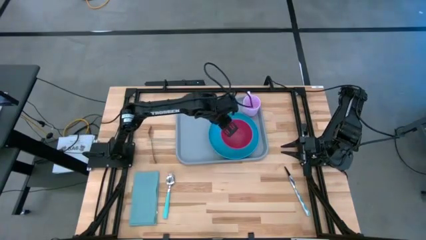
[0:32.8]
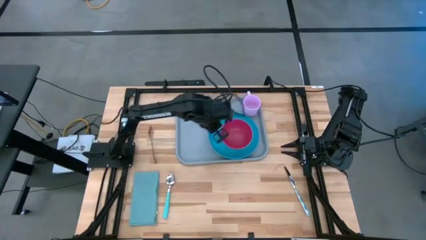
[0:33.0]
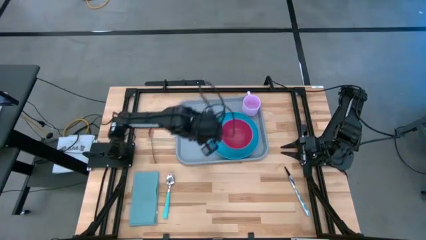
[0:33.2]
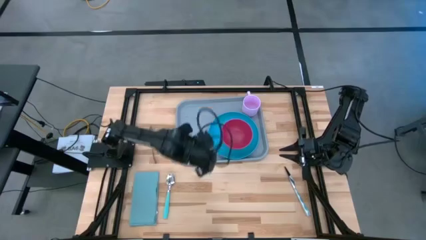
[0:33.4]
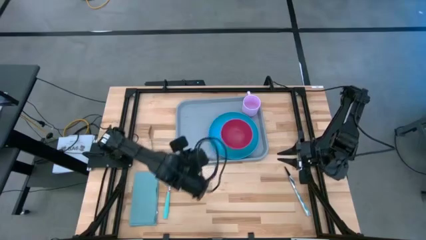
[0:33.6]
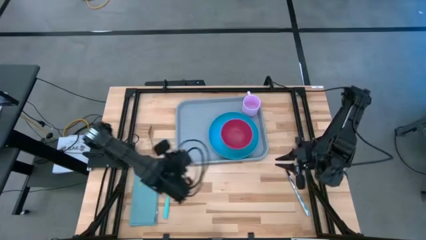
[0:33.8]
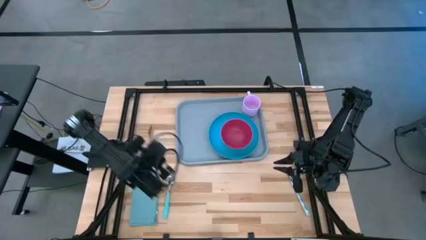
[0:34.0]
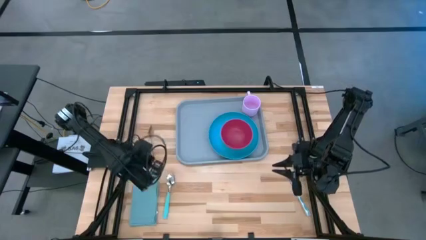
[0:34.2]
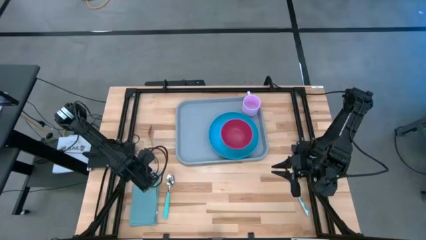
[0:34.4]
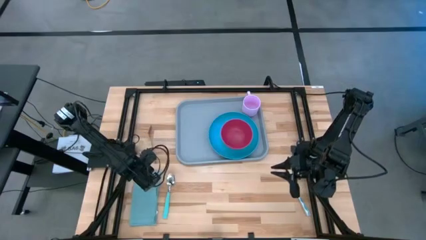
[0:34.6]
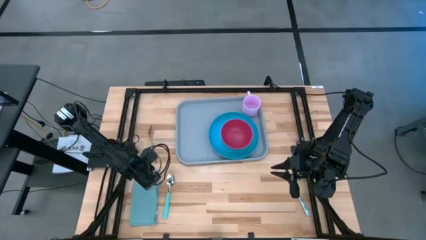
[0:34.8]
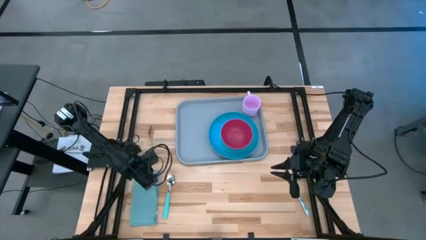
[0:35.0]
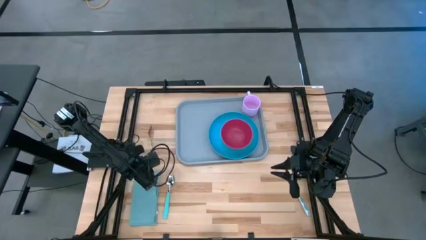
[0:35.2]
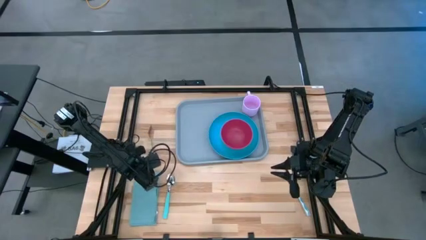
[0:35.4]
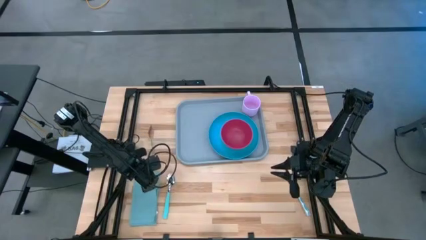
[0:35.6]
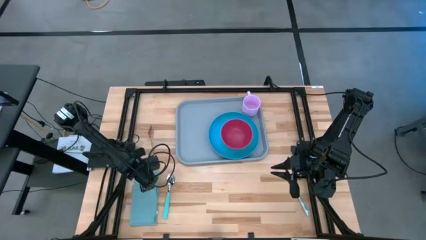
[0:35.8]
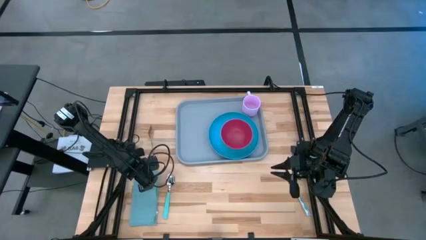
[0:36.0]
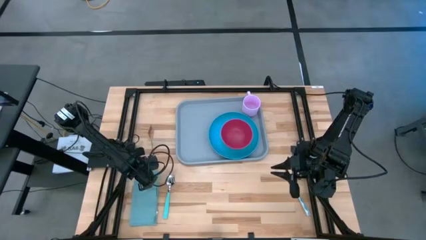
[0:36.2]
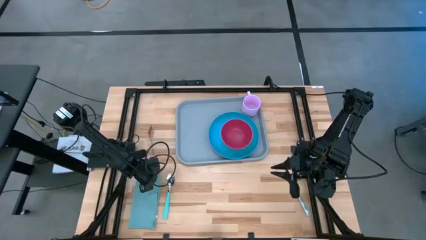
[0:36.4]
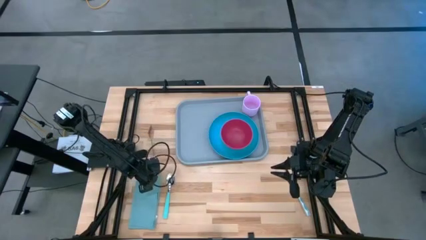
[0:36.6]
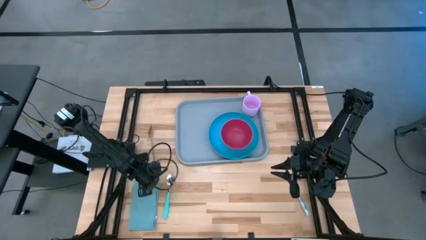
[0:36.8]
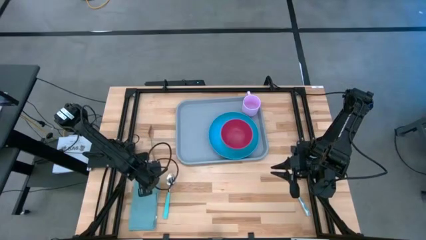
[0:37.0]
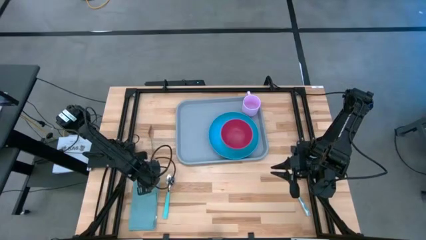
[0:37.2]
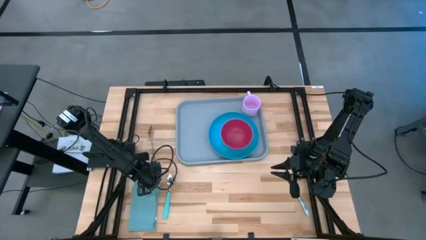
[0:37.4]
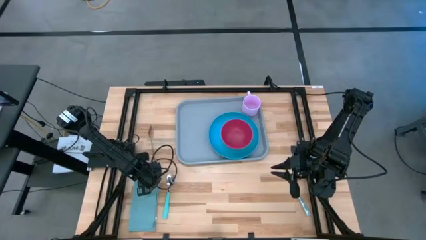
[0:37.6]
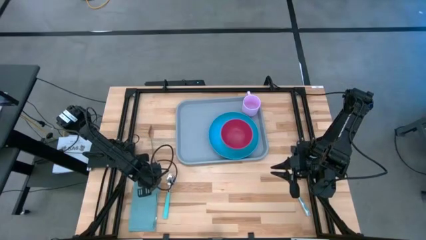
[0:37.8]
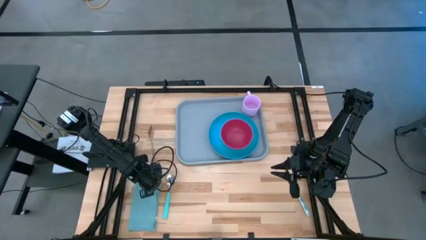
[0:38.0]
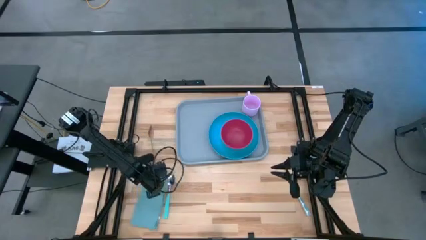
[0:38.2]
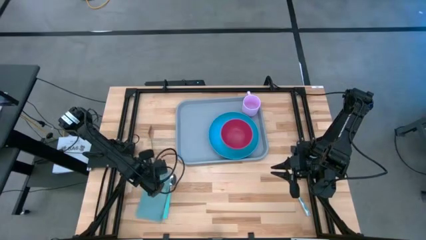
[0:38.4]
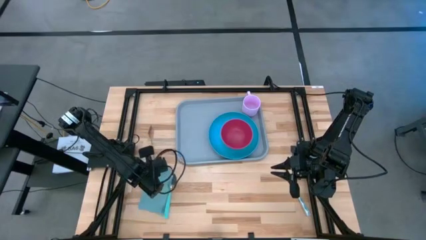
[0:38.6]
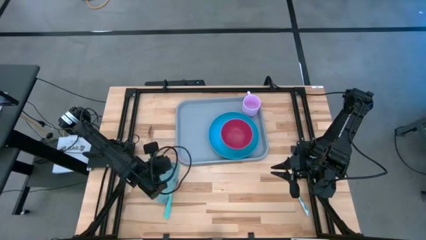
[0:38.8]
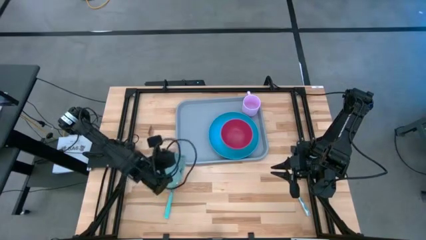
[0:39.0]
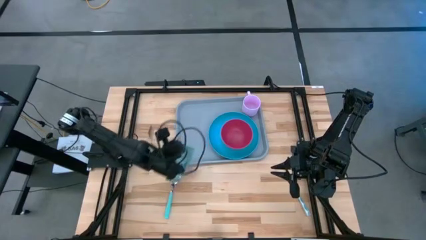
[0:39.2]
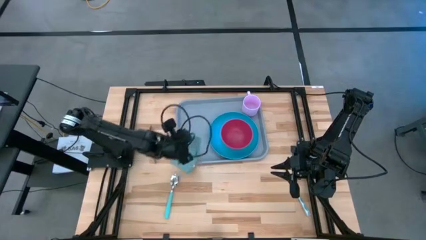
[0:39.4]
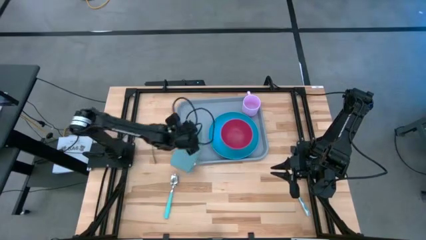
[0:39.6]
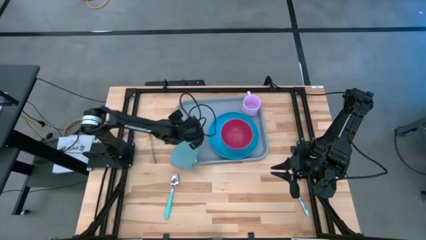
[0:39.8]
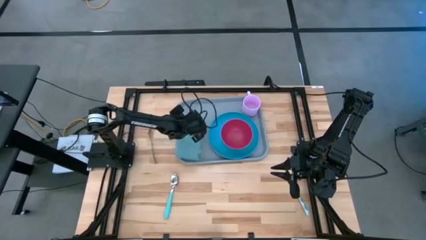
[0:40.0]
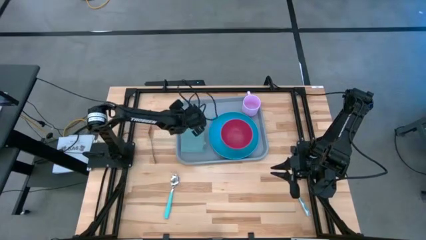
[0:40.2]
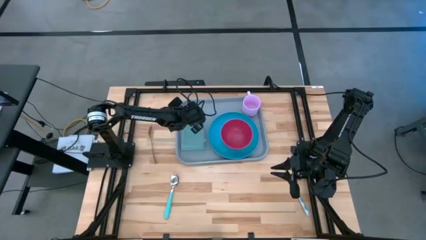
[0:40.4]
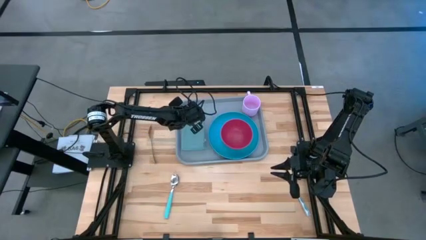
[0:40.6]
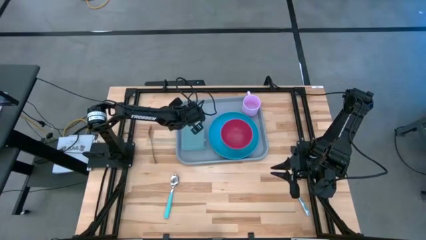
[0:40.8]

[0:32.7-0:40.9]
Task: Set up tray
Put the blue napkin on the gray tray

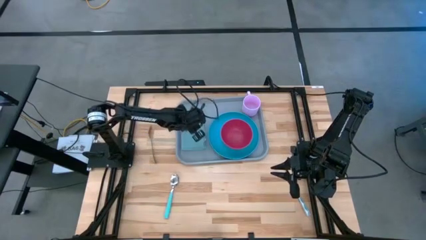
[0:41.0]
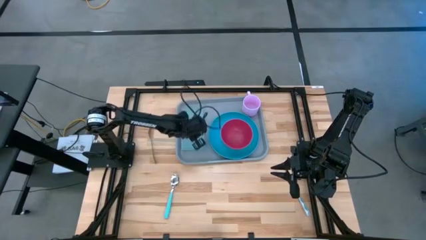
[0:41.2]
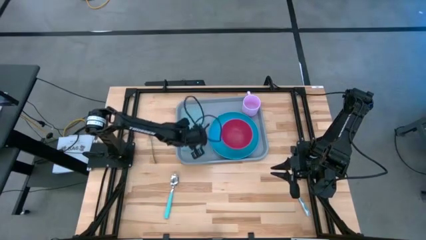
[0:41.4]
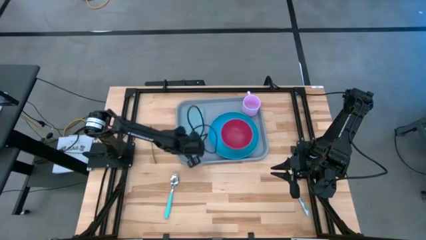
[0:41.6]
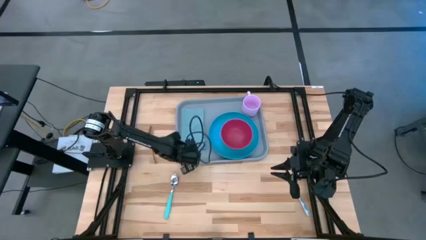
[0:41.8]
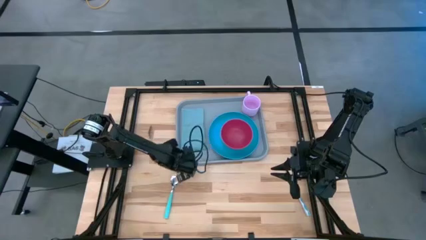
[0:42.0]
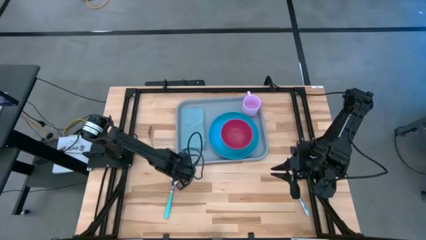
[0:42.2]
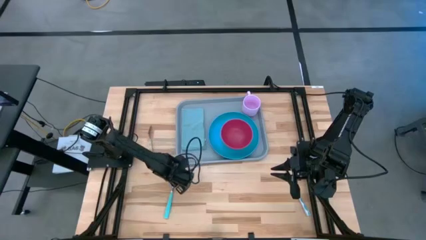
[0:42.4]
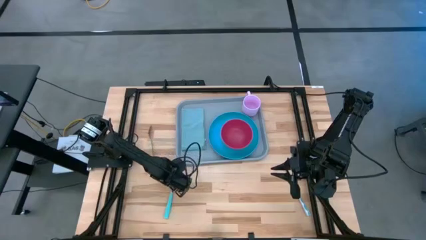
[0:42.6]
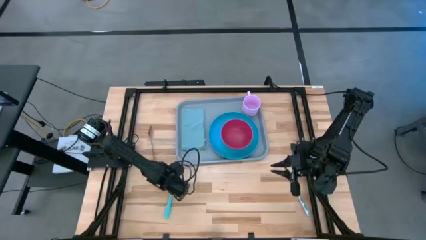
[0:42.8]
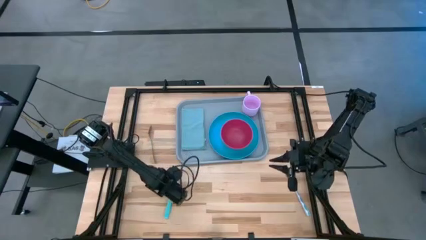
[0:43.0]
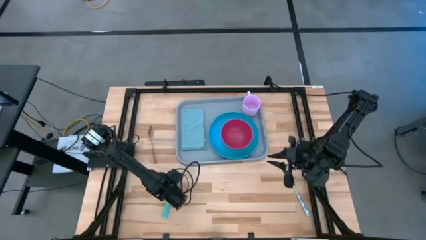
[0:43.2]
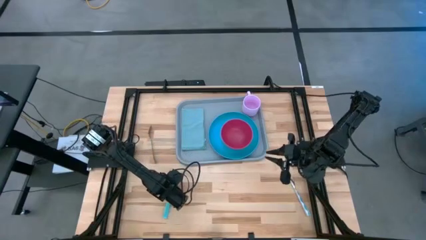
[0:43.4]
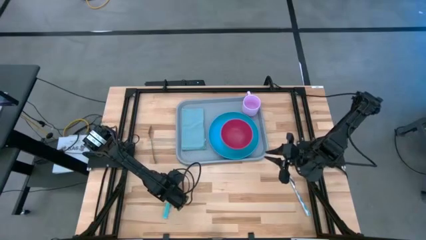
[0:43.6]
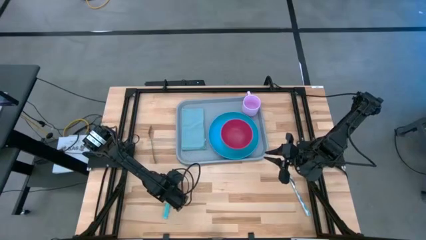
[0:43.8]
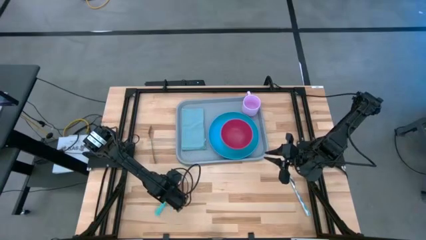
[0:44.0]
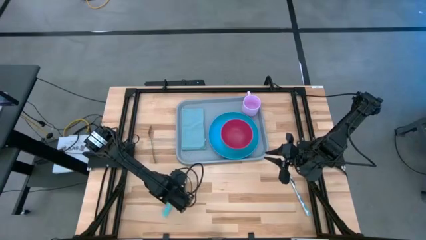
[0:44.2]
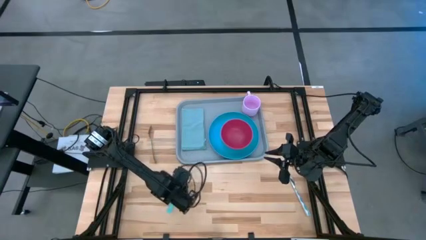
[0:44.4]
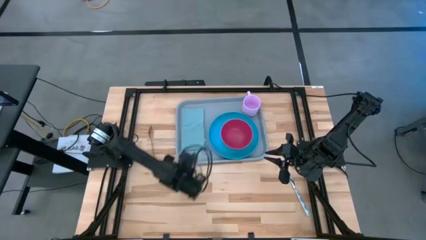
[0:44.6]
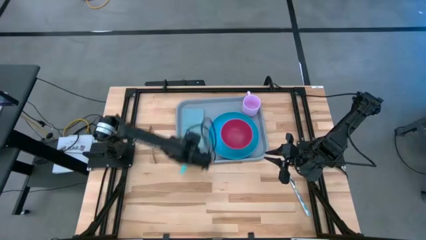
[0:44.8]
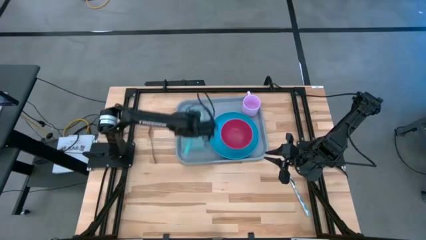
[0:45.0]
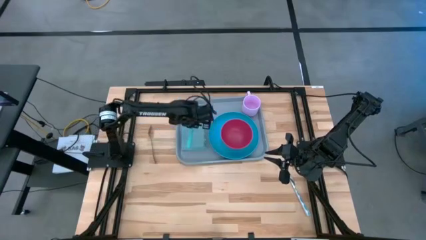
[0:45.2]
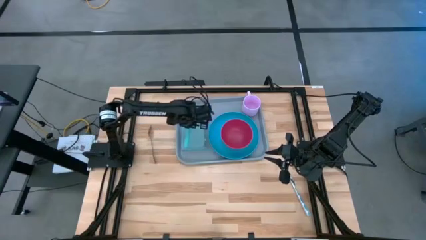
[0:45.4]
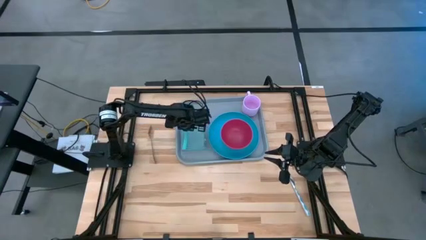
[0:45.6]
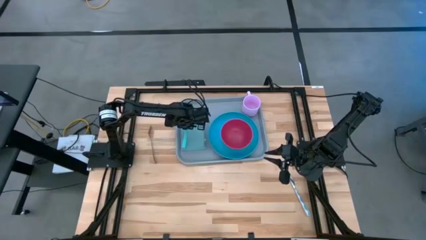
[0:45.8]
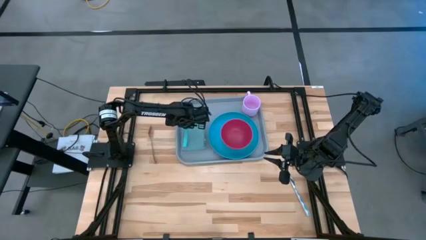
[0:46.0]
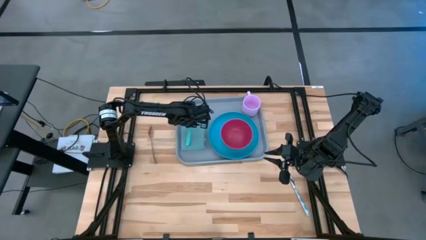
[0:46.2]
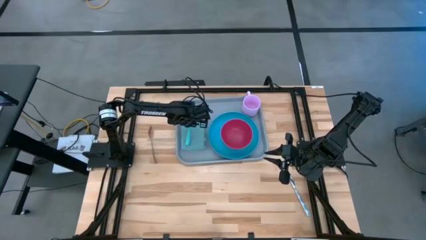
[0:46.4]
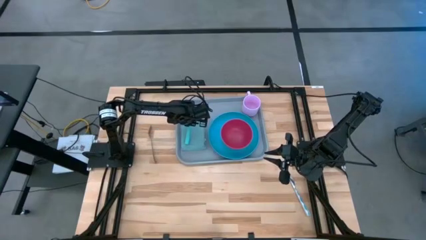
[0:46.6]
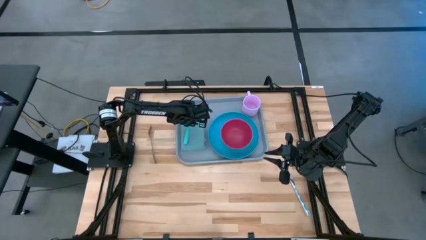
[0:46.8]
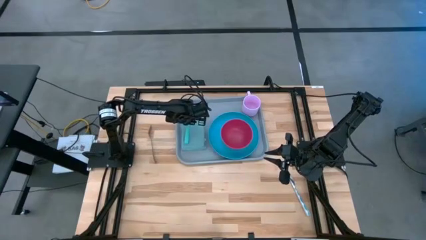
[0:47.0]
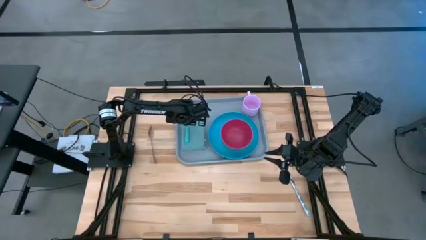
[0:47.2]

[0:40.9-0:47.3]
Put the blue spoon on the blue napkin

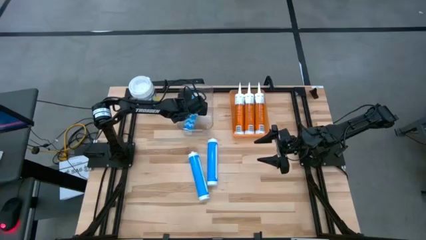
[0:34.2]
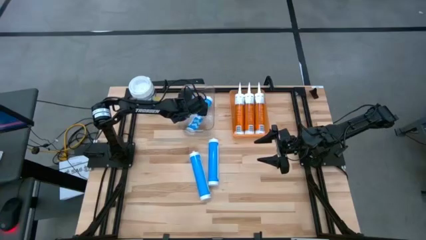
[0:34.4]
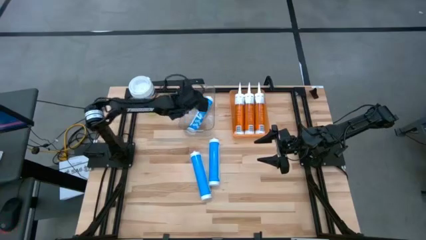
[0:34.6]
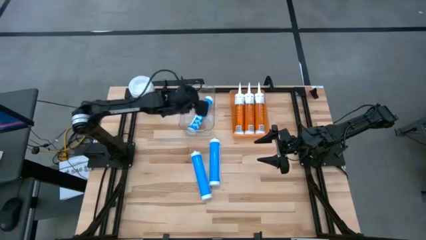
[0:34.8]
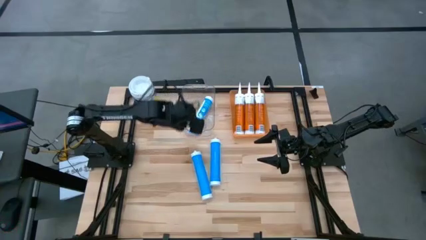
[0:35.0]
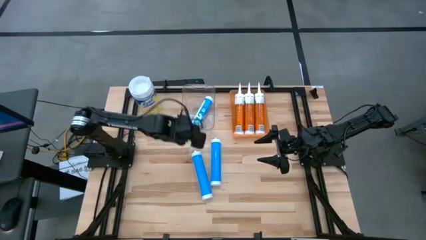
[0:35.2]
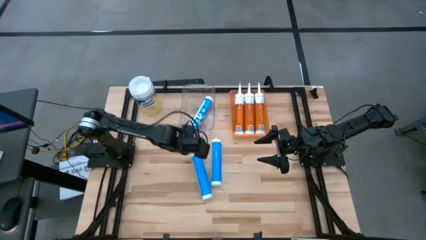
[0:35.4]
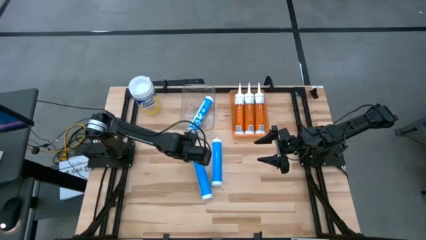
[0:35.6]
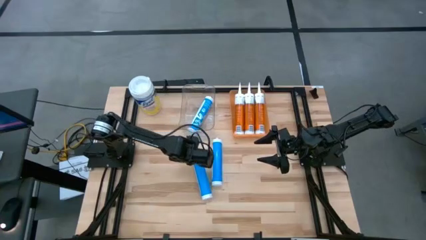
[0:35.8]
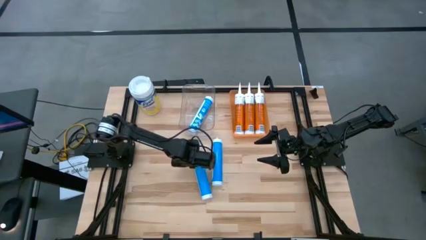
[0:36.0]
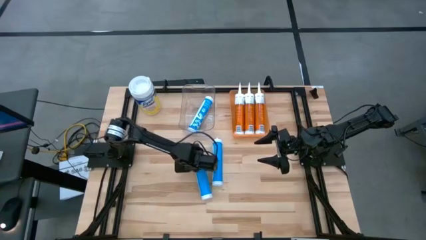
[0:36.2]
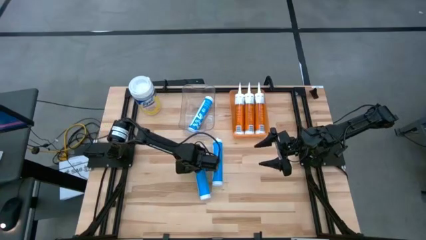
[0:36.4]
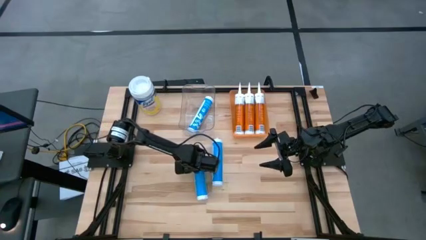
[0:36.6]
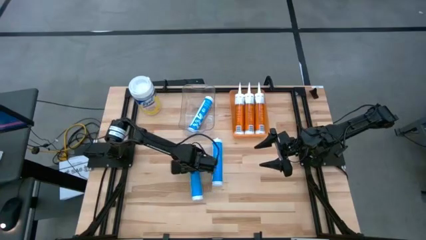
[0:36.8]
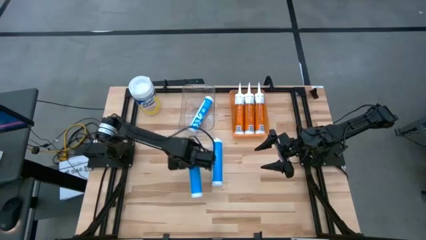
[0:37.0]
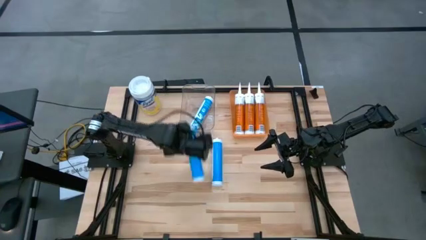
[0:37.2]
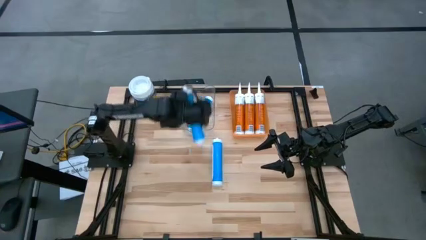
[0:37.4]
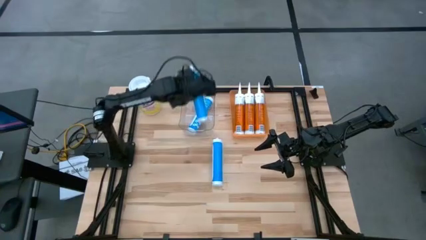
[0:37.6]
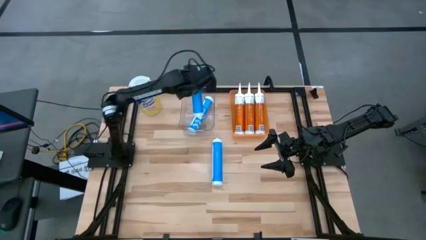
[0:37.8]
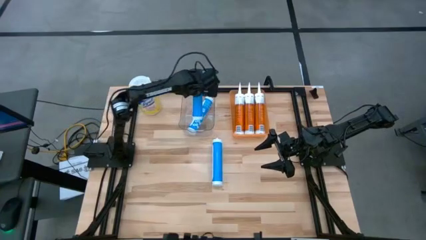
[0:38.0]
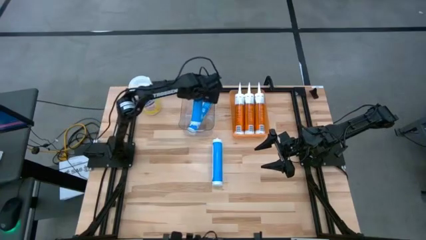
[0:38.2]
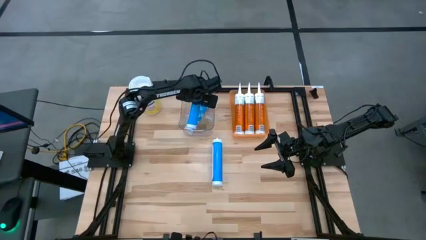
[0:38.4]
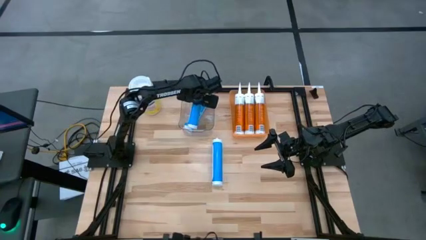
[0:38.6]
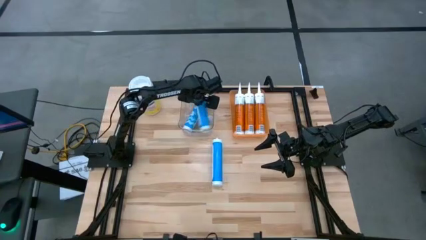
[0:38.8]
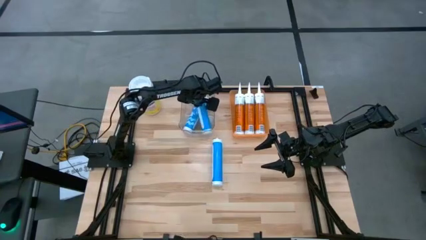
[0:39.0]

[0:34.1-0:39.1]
Task: Pick & place silicon tubes, Sealant and Lysol wipes
Put the left blue sealant into the transparent bin
